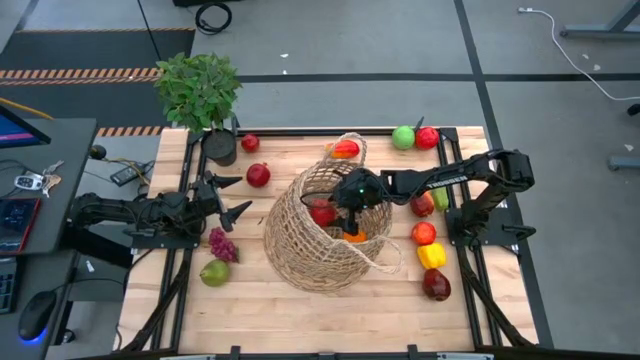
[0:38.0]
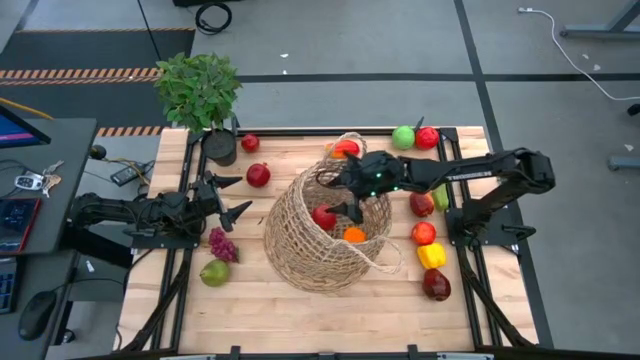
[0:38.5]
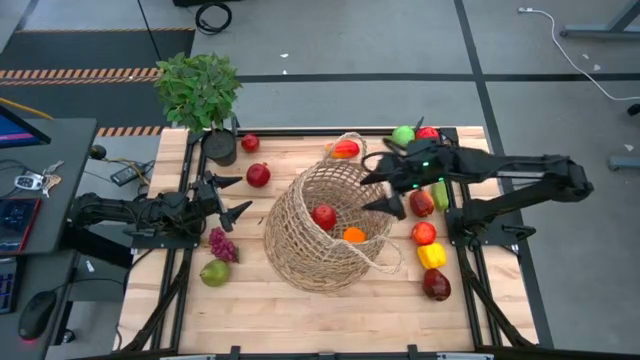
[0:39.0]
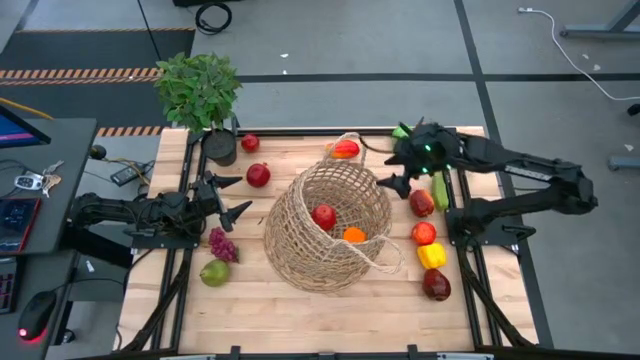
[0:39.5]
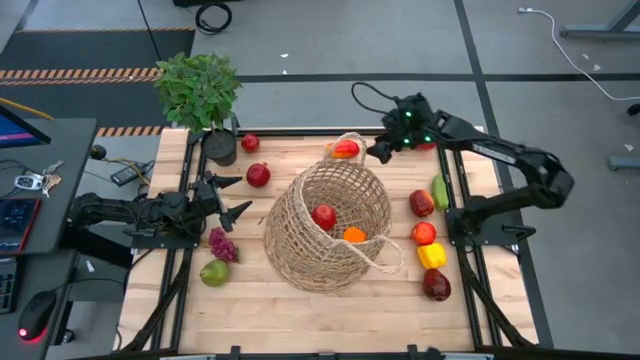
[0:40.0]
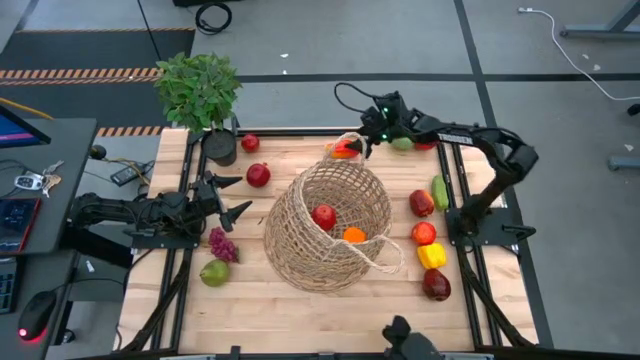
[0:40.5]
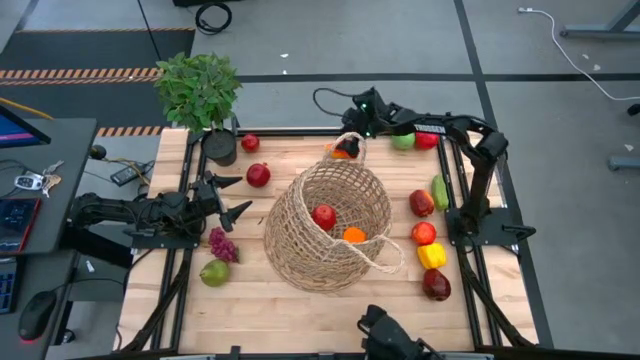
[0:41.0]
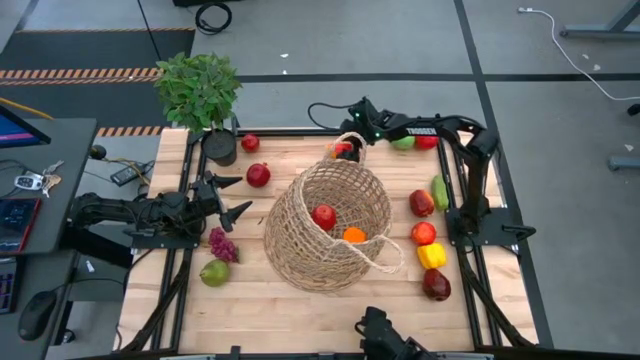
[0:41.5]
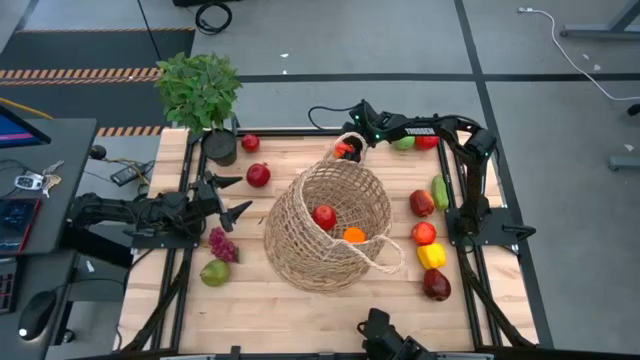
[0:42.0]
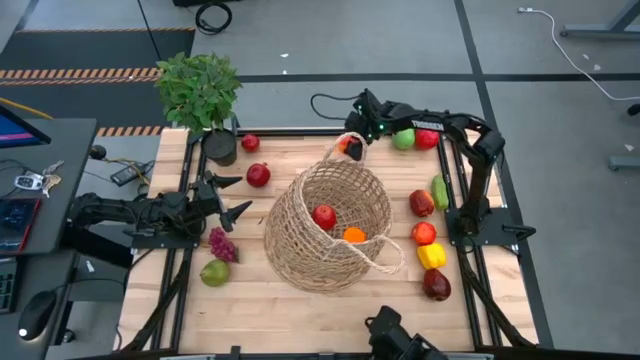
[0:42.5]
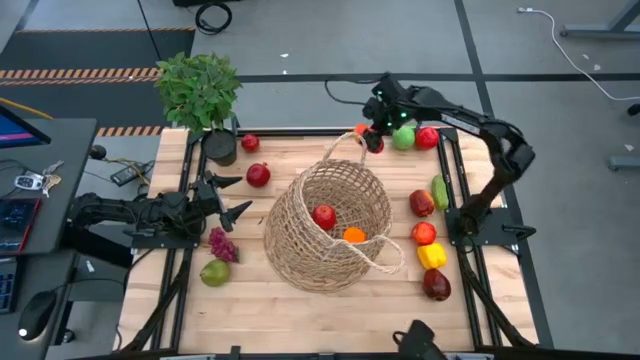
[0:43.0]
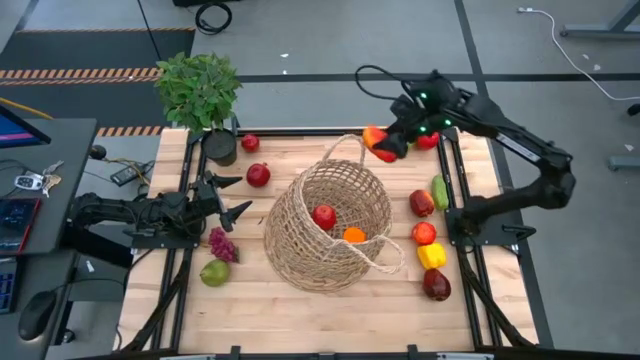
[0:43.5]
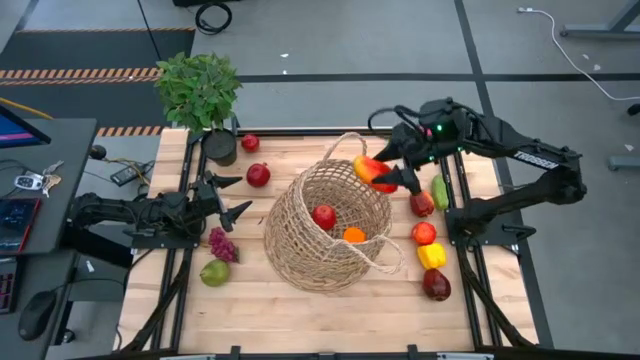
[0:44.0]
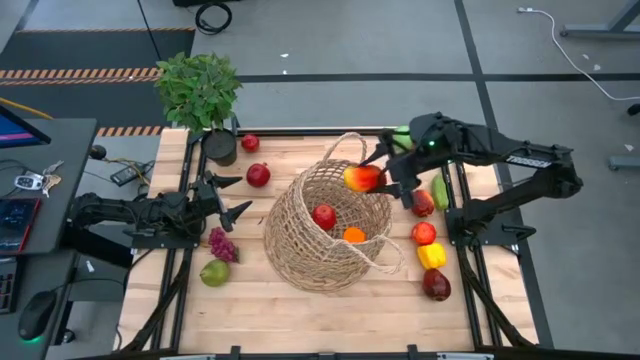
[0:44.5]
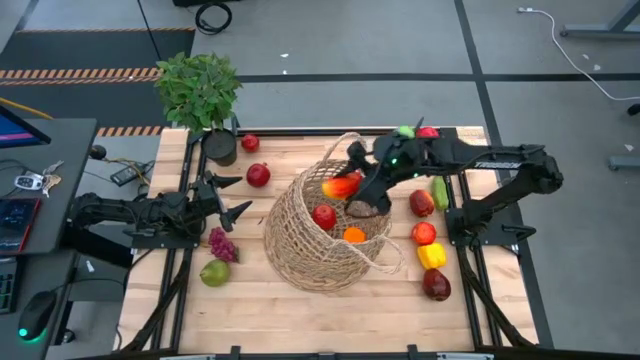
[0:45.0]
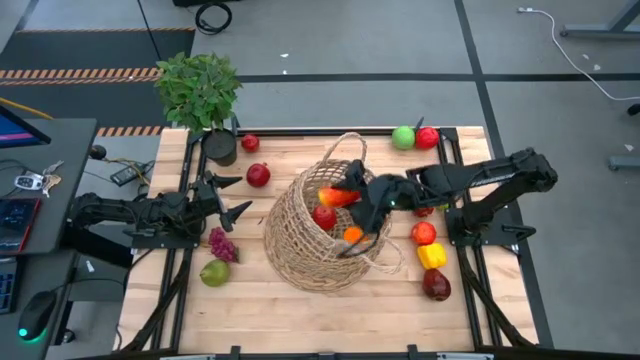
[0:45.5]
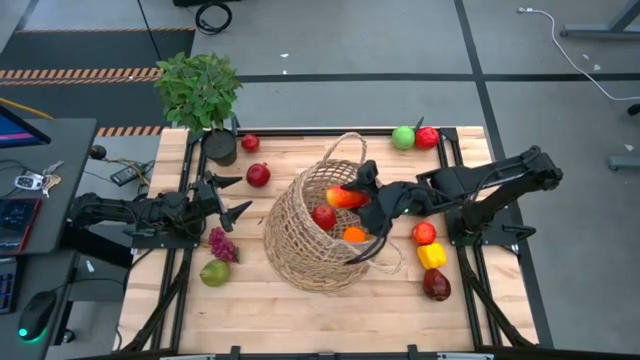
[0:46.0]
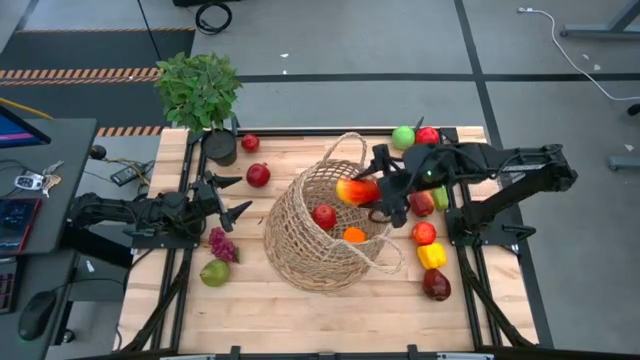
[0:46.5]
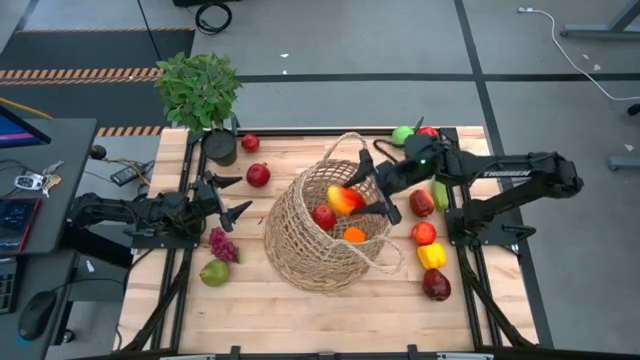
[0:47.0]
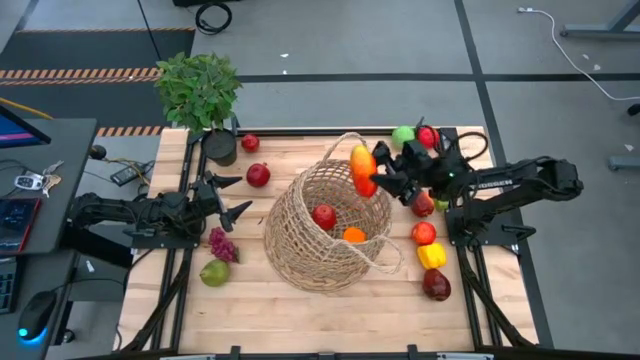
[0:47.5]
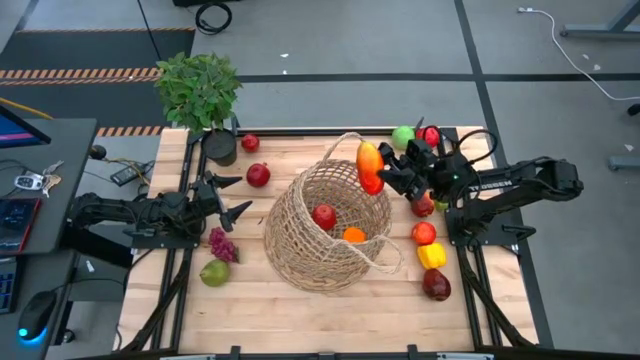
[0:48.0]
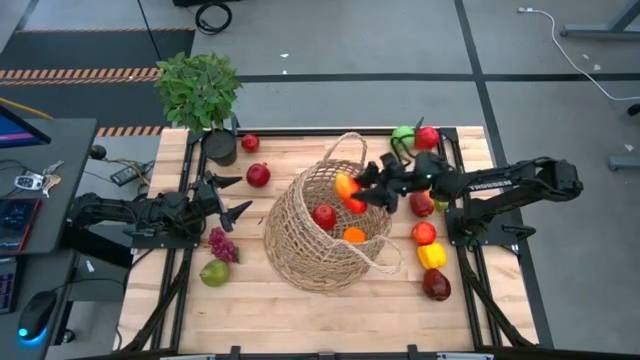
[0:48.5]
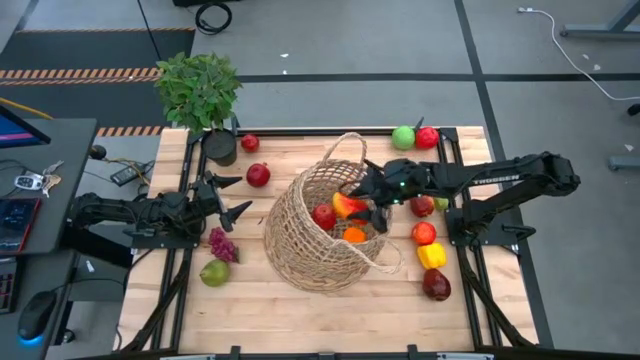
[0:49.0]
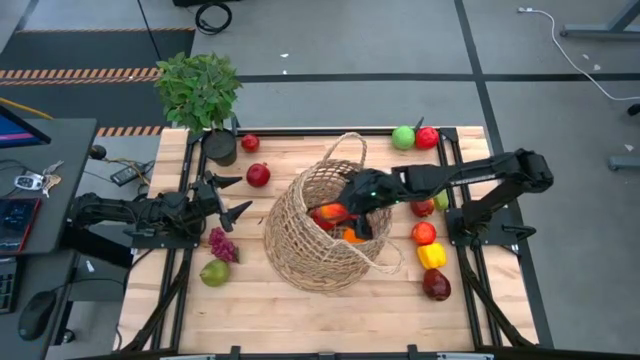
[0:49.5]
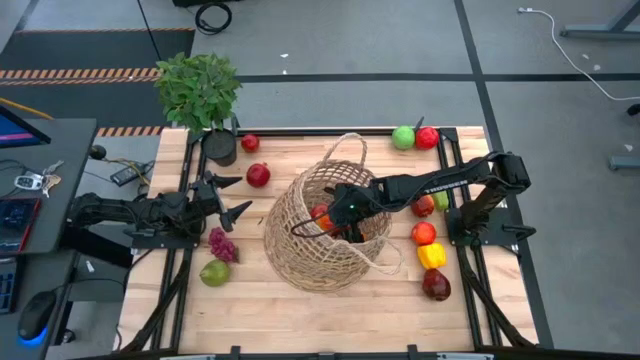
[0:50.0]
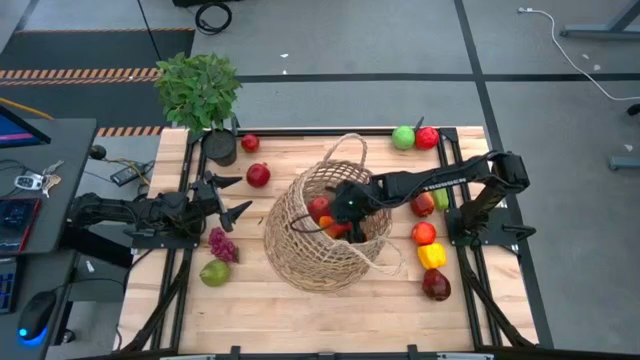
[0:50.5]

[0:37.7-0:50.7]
Task: Build produce basket
Put the red mango into the brown basket

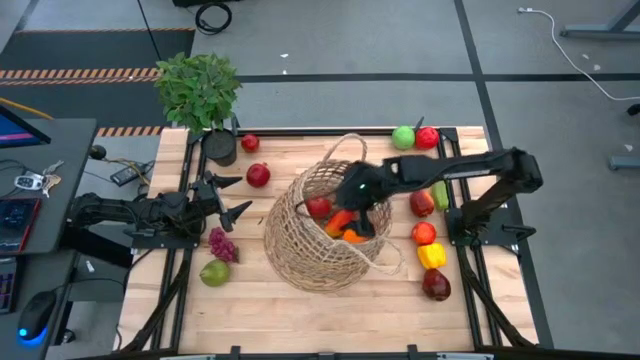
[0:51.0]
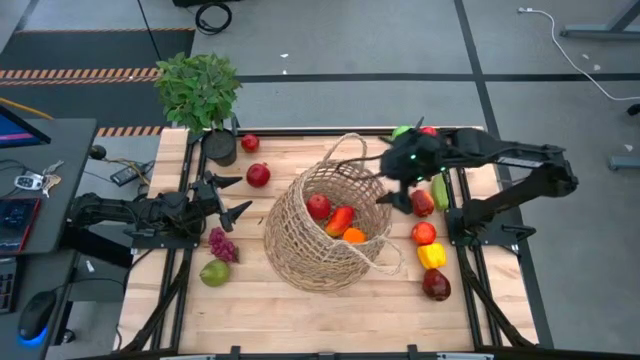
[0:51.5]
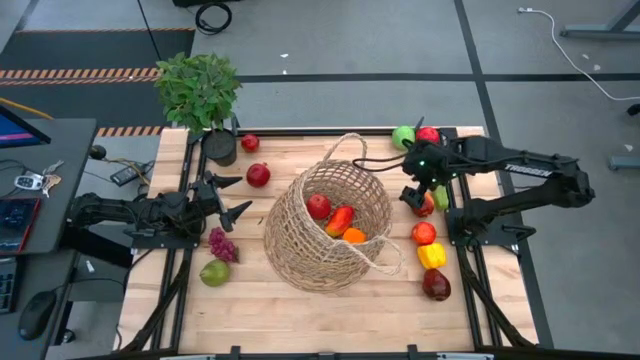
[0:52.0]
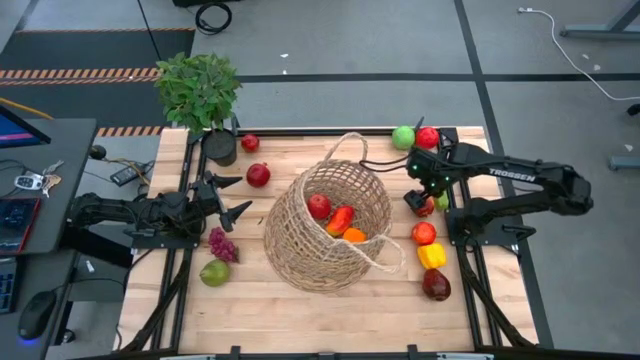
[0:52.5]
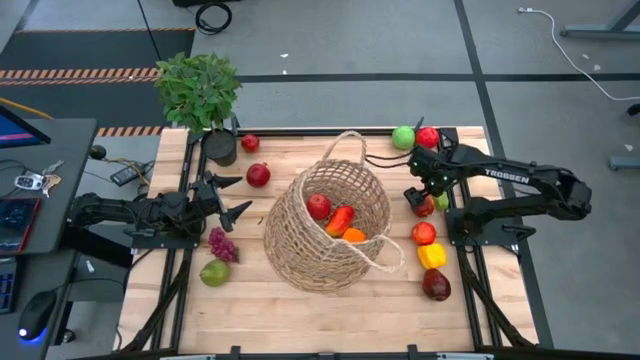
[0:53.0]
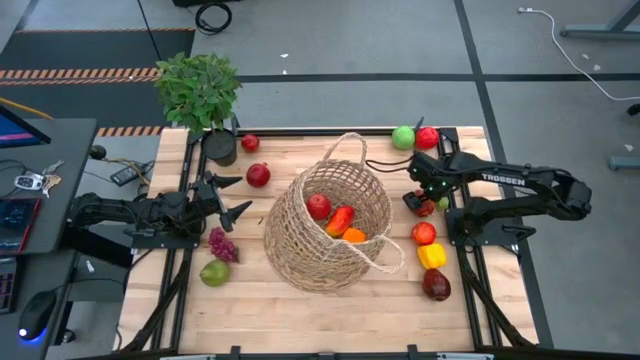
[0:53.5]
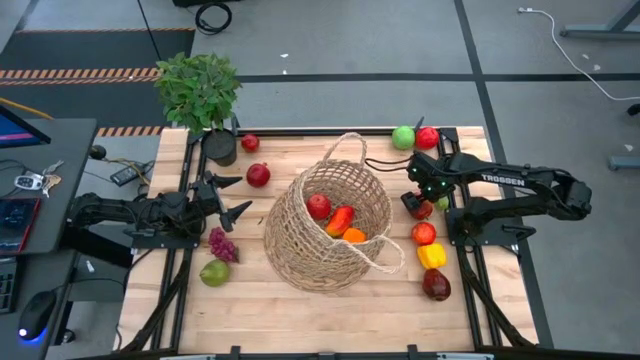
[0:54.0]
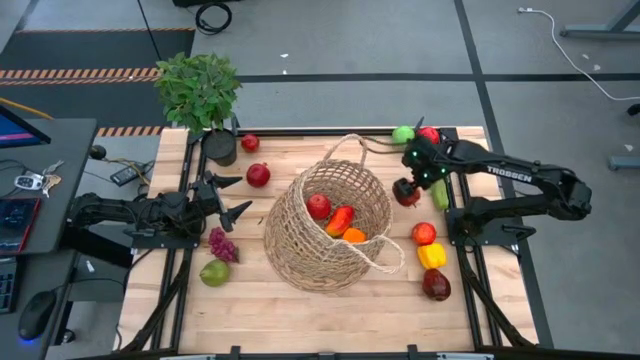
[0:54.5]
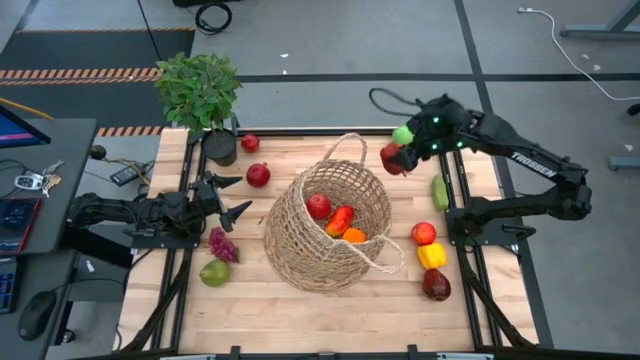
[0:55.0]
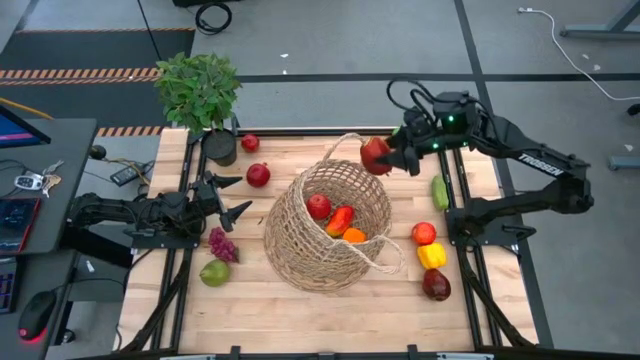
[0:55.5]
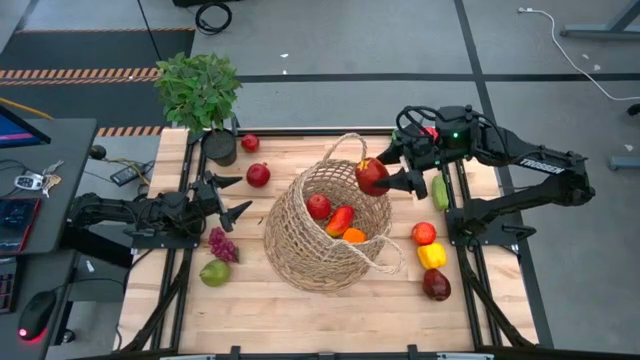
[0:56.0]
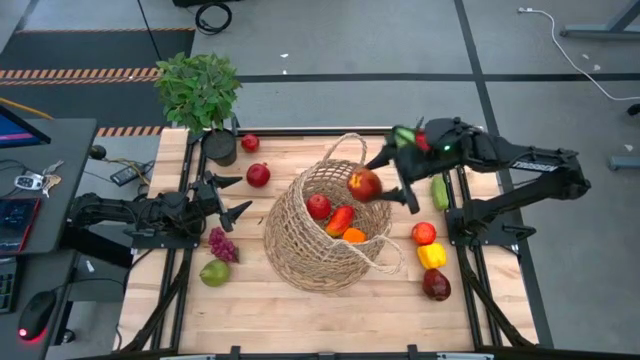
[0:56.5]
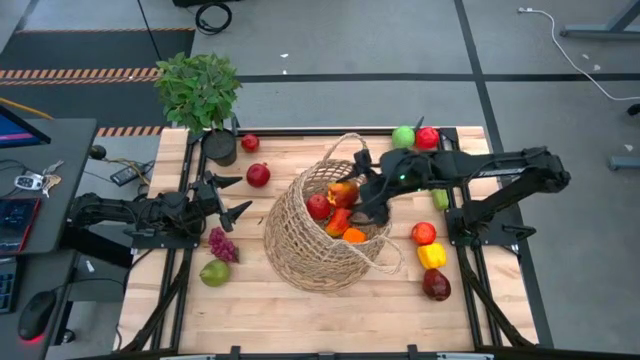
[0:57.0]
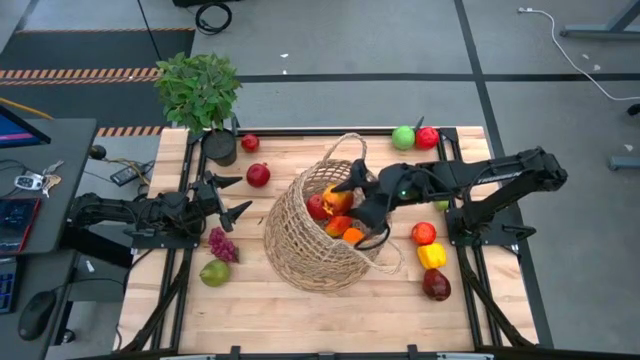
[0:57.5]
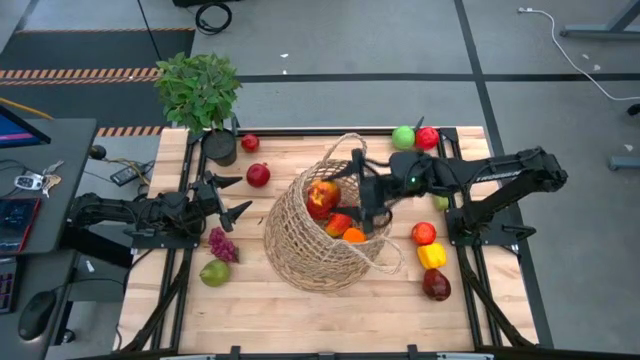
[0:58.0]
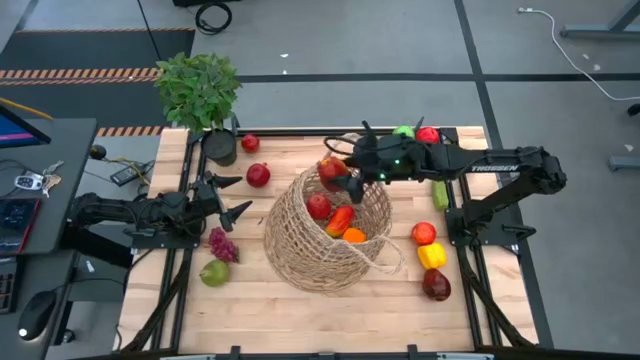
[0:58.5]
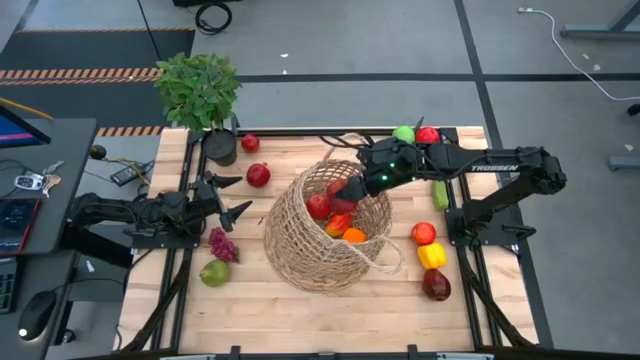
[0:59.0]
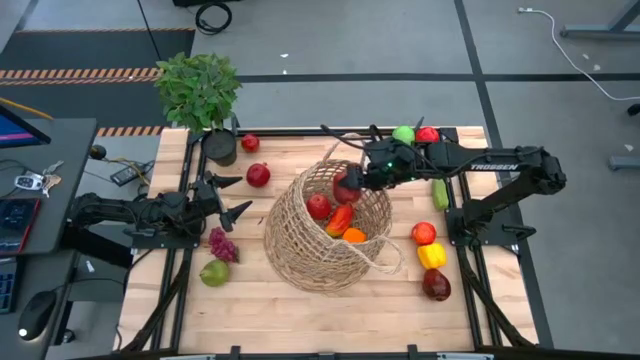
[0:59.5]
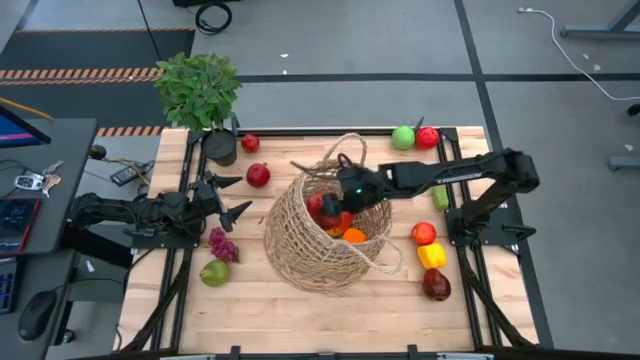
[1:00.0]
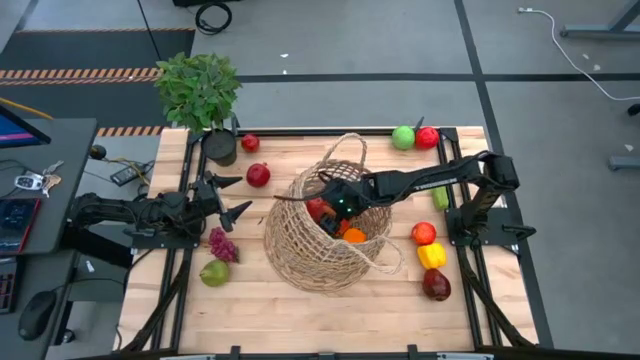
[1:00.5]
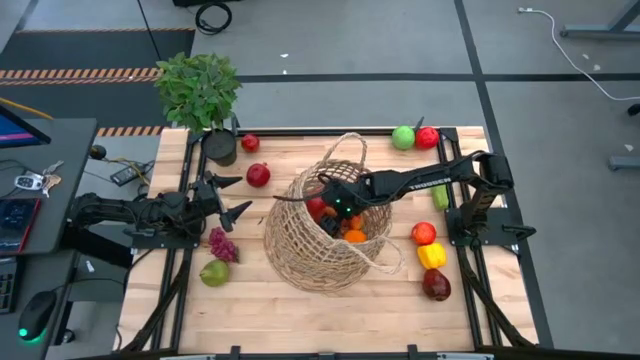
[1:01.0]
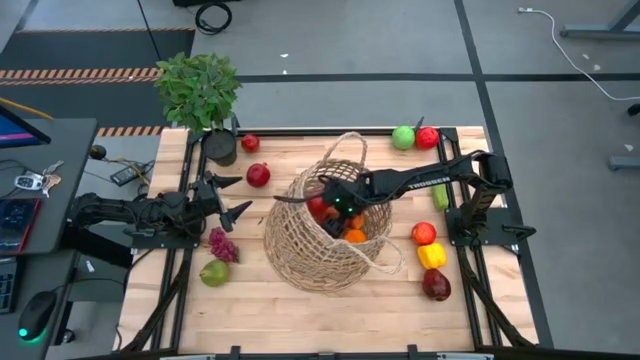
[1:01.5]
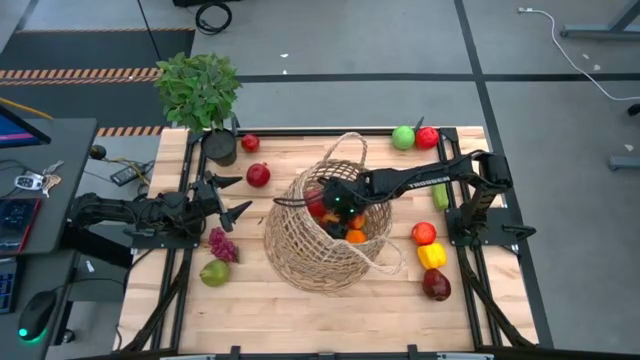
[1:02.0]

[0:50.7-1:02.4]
Put the dark red apple into the brown basket
